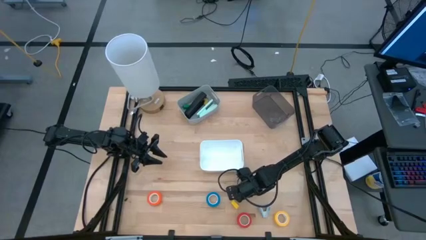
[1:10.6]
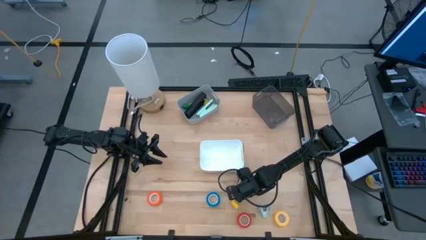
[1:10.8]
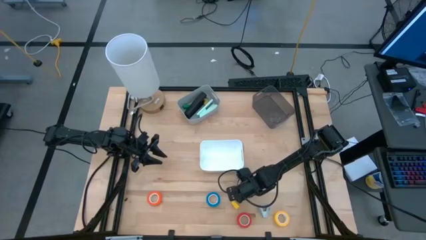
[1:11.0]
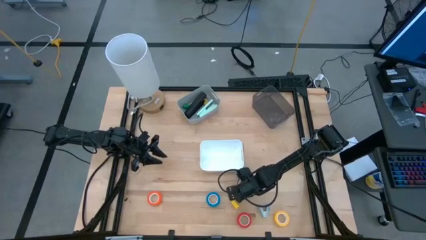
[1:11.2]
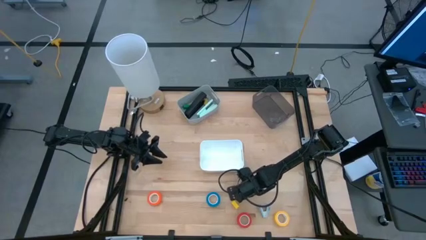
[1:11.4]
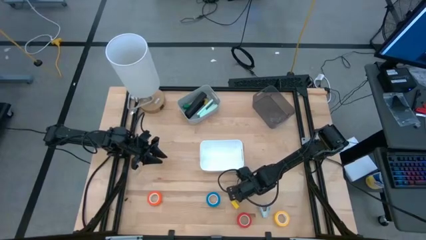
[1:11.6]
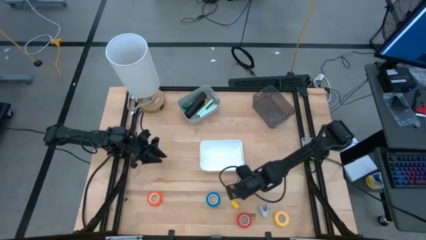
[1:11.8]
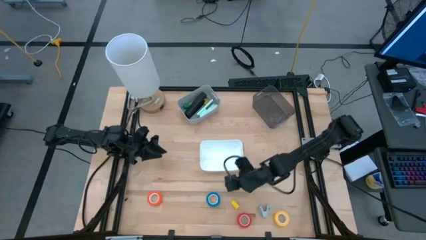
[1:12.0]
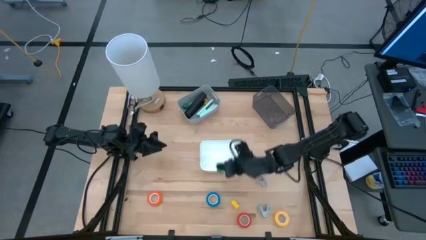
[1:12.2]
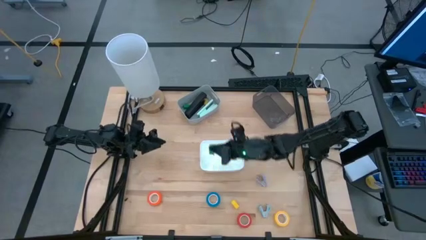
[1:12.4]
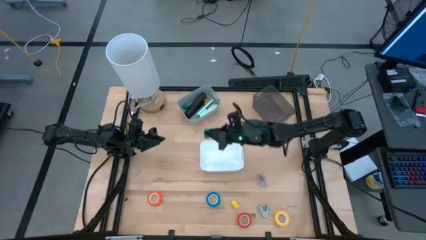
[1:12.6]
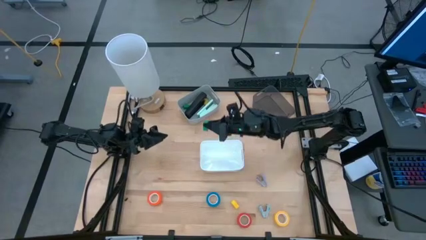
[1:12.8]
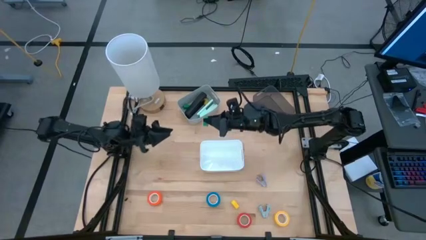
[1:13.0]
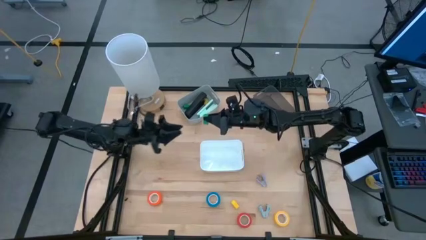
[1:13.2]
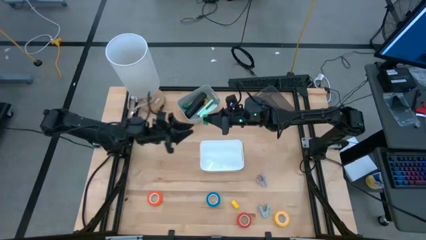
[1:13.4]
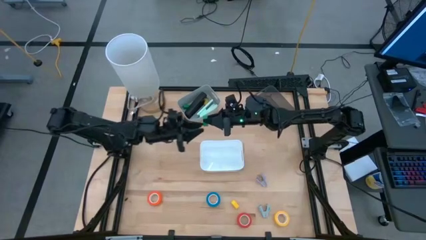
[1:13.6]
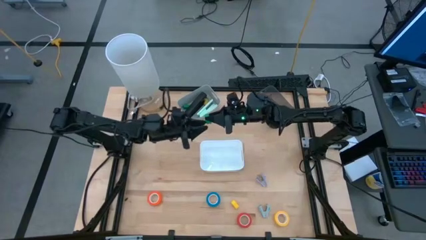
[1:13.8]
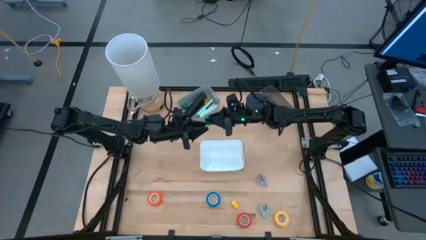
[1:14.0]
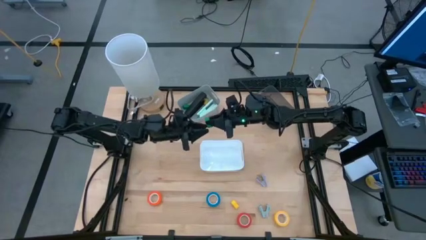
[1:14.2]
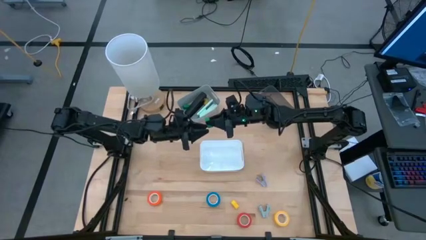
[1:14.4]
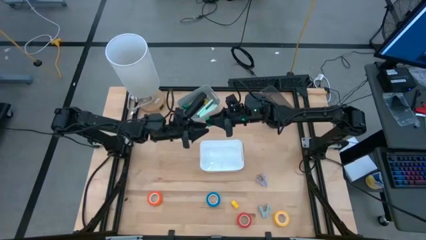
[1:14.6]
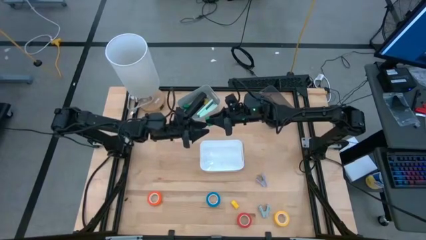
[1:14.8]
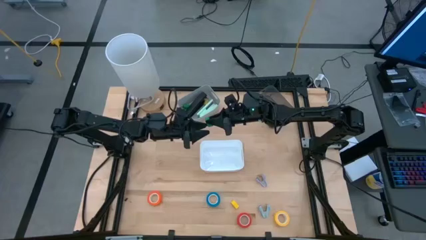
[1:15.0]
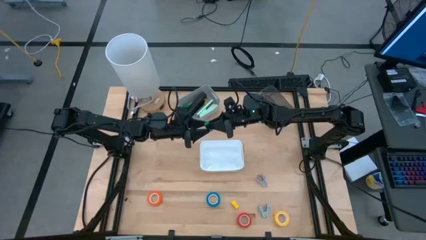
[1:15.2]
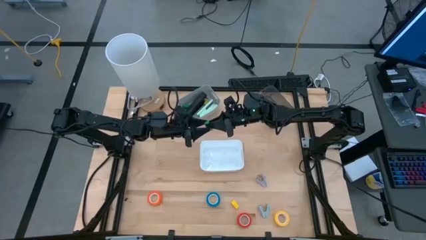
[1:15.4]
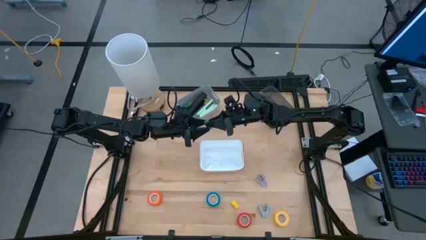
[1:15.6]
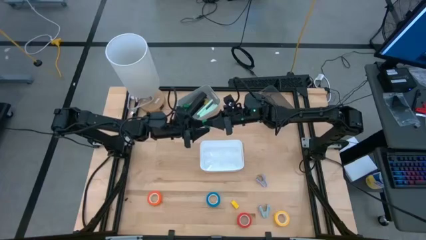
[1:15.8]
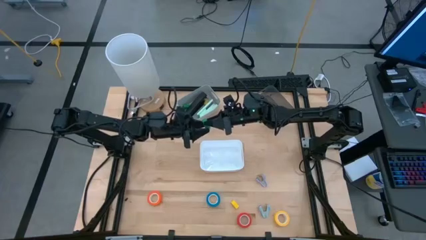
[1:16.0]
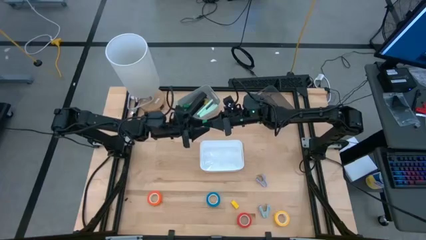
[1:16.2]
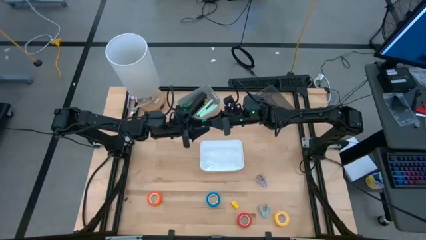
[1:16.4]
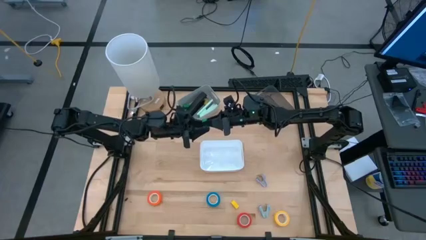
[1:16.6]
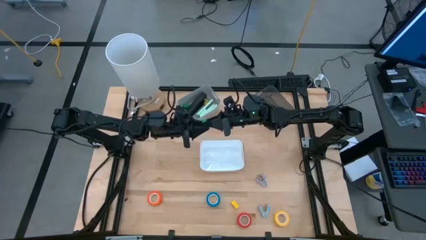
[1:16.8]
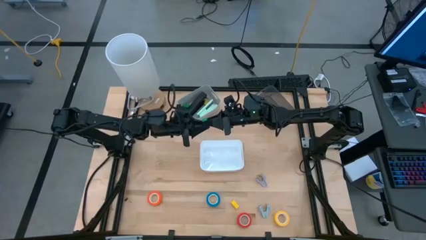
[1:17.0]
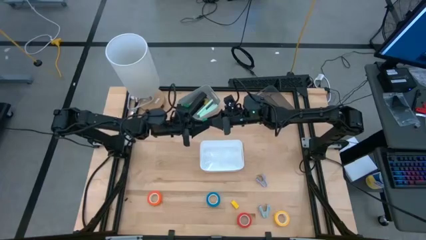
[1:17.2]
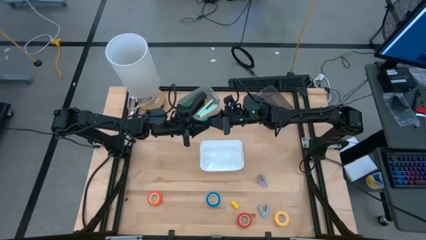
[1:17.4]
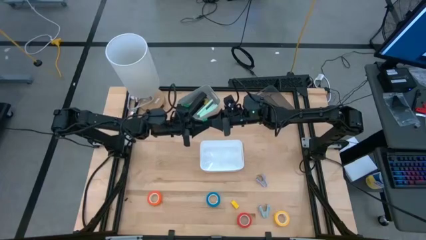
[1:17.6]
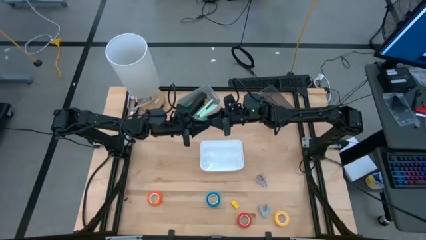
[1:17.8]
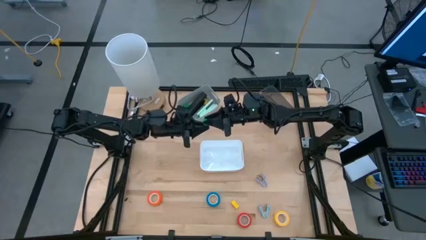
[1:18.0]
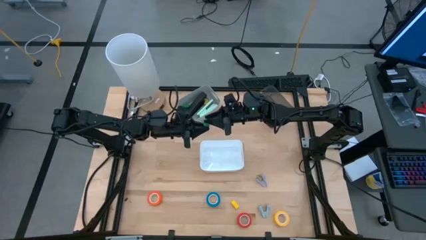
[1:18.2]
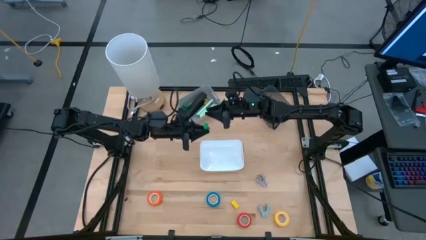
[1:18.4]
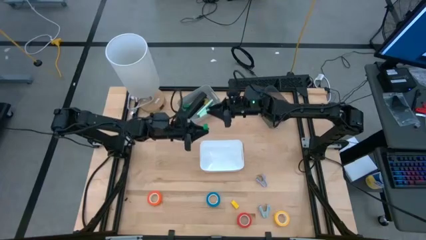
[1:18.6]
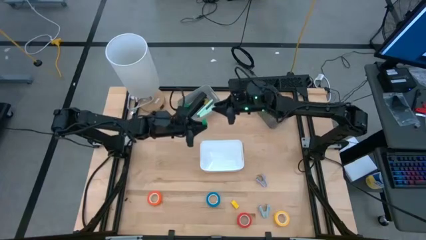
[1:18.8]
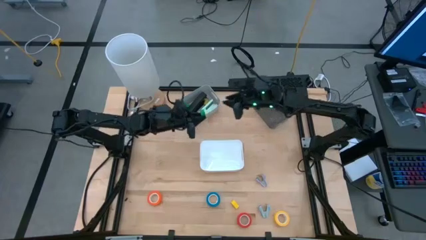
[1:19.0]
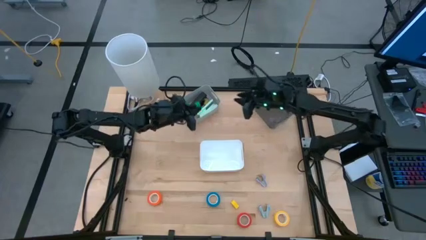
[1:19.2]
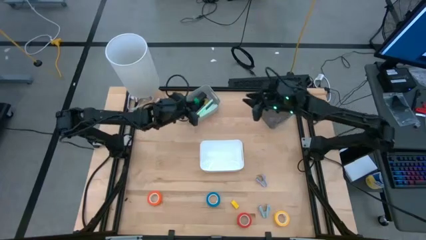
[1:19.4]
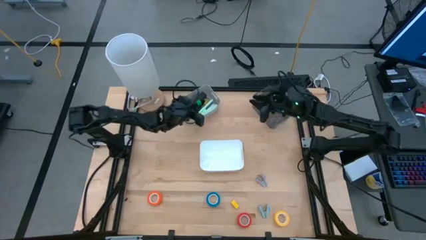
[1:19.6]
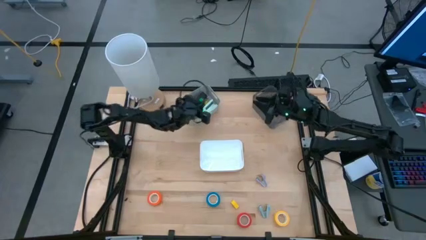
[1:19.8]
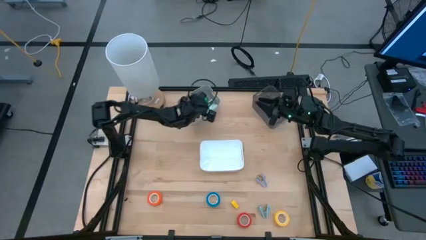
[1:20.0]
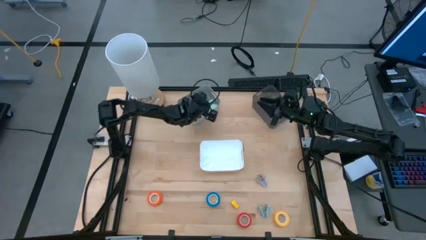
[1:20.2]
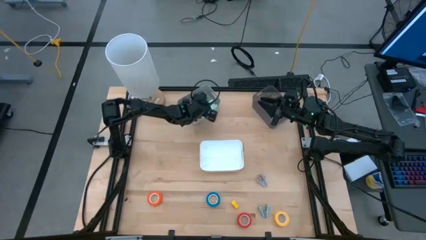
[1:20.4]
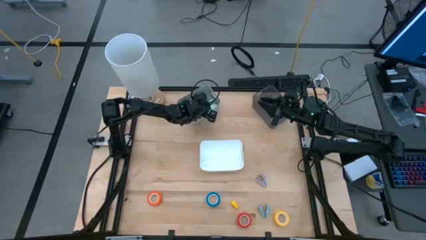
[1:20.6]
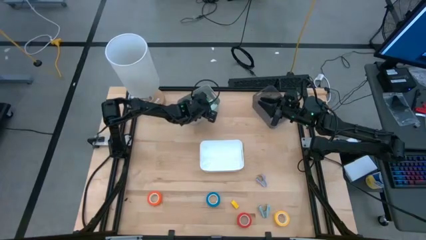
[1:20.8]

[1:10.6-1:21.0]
Task: Pick and place Stapler, Stapler remover, tape
Put the green stapler into the gray bin

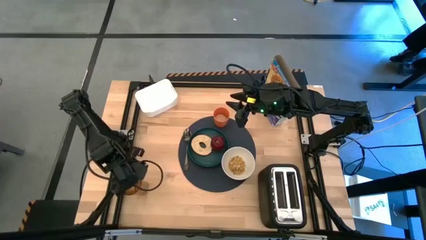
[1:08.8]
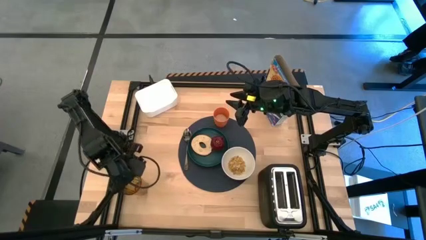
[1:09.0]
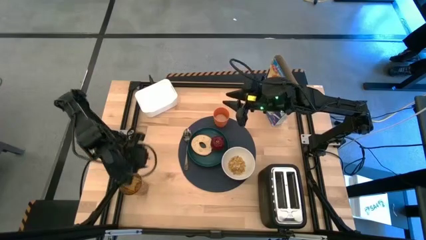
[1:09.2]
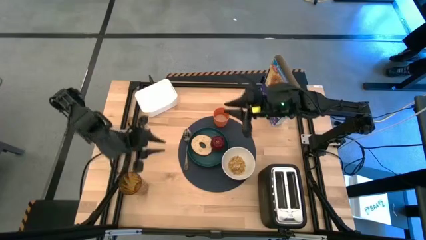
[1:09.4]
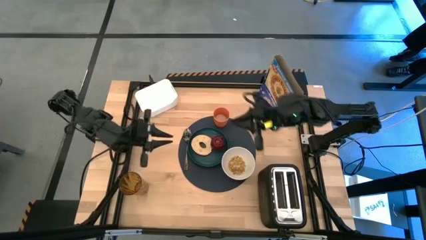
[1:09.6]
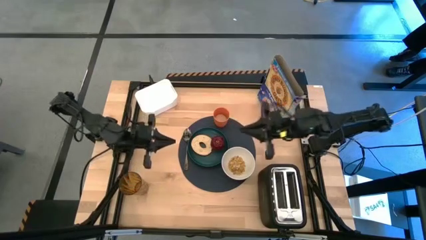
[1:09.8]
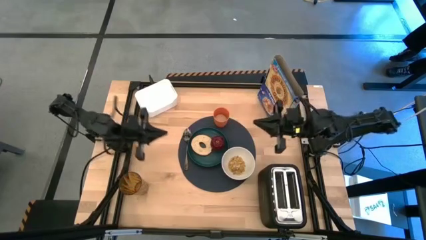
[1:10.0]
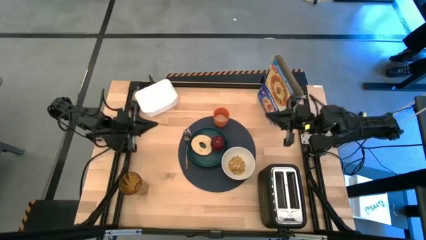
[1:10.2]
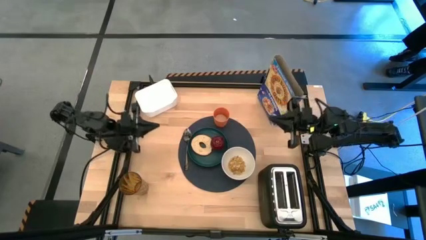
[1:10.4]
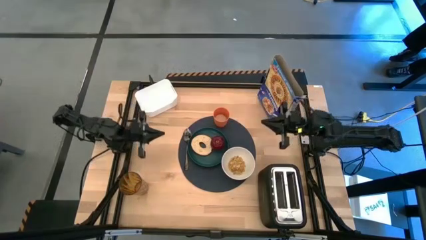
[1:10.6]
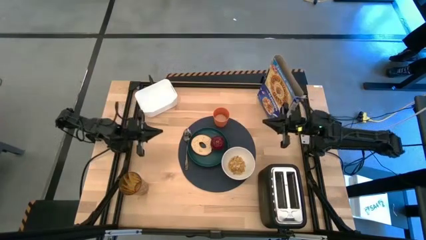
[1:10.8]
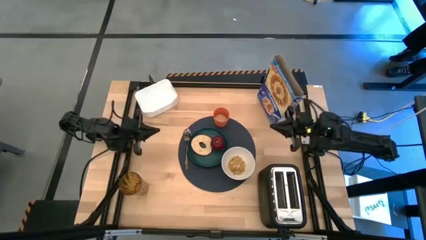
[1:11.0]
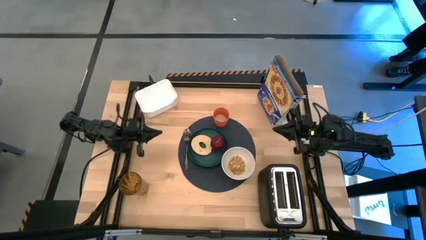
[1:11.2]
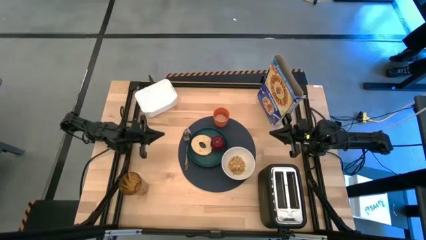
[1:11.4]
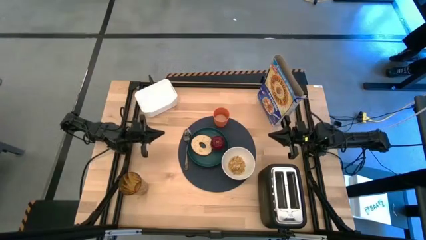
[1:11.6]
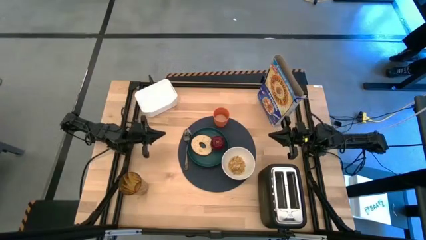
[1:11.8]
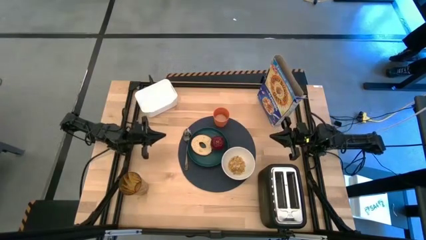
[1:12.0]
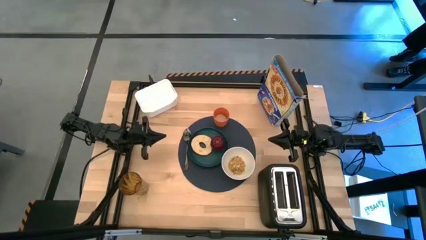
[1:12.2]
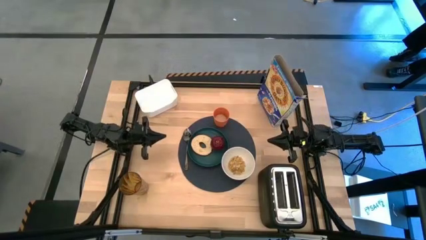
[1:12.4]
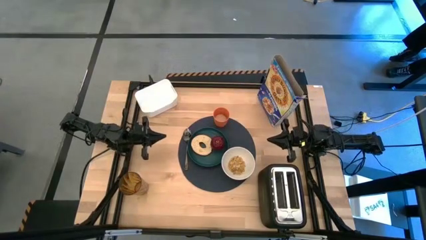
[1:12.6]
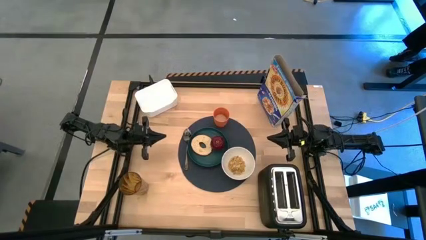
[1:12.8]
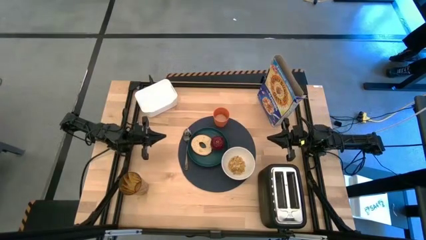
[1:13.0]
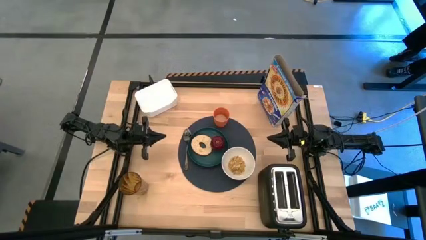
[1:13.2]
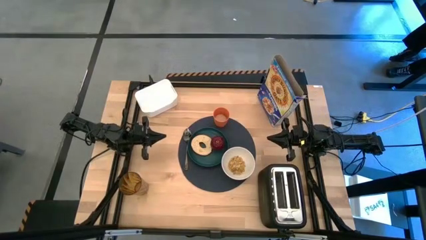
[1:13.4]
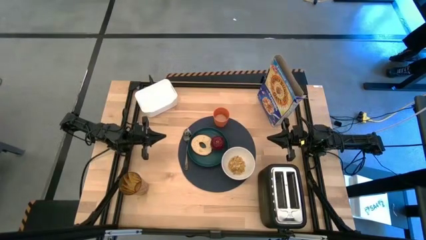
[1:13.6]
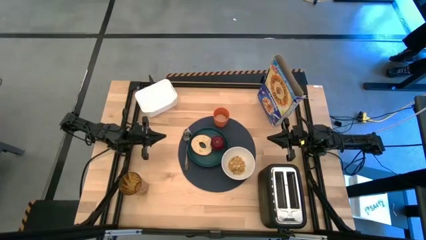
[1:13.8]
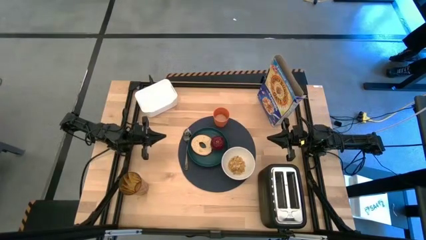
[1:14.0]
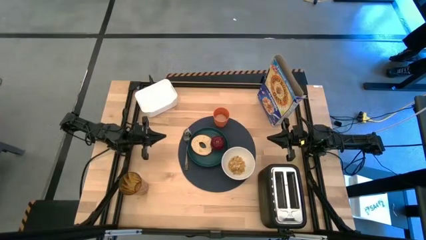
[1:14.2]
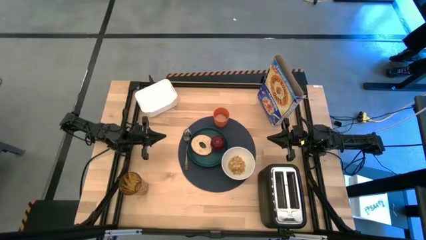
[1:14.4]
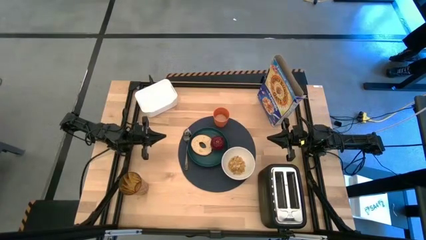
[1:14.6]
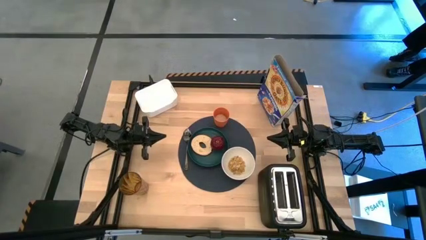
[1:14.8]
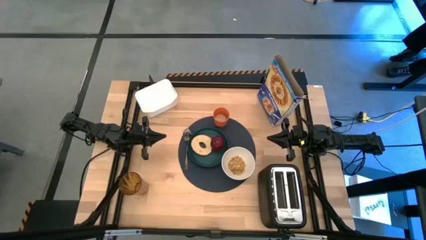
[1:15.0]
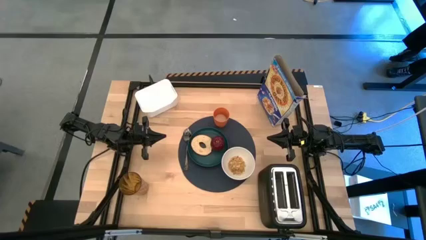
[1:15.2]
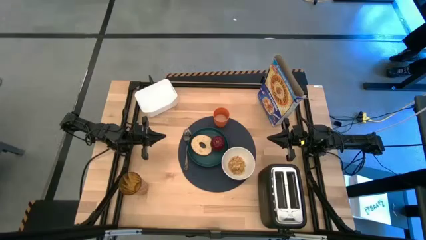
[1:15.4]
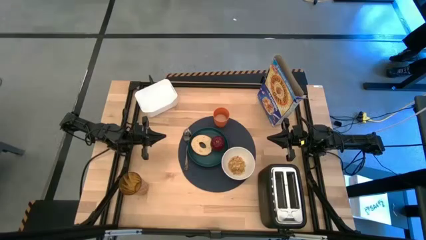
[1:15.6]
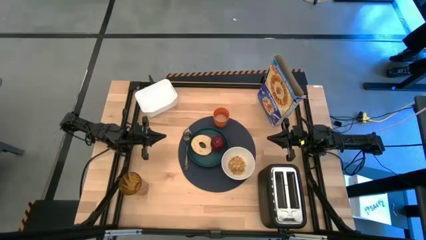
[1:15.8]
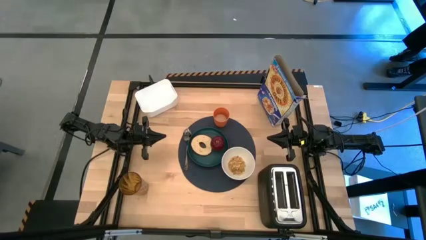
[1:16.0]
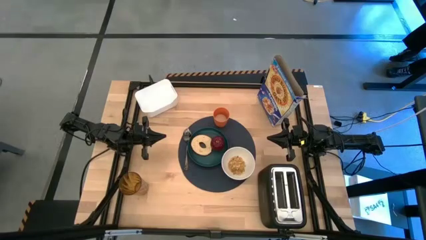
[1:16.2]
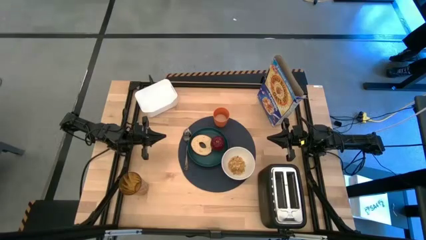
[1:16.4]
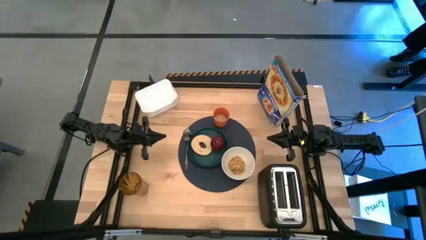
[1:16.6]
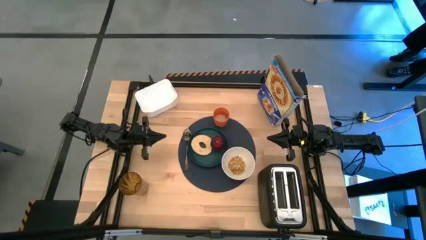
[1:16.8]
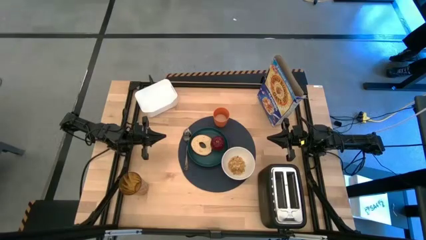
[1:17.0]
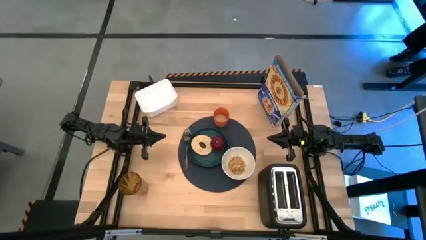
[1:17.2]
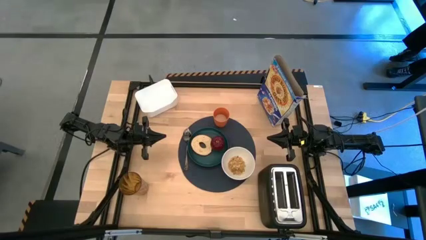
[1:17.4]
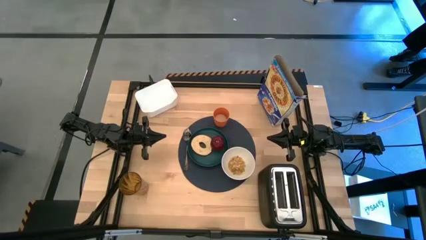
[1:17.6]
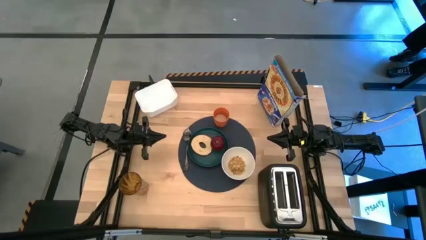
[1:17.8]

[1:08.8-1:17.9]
Task: Arrange a breakfast setting
Return to Home Position
